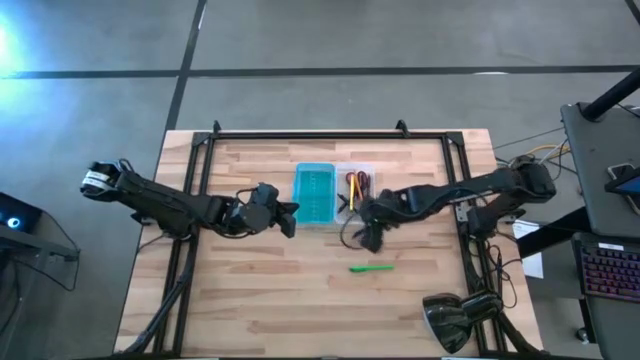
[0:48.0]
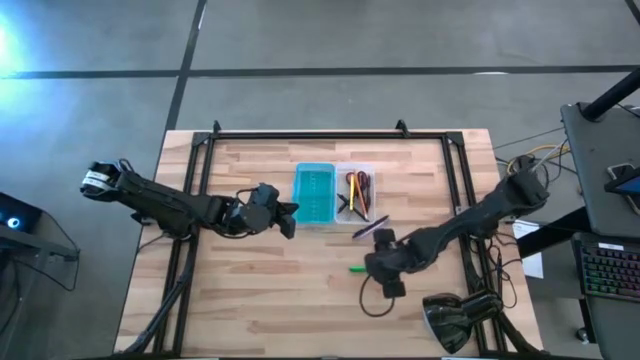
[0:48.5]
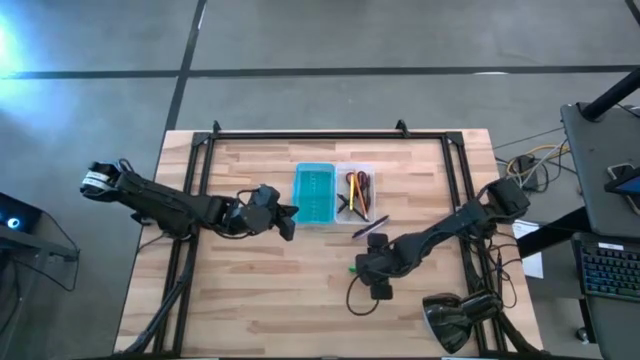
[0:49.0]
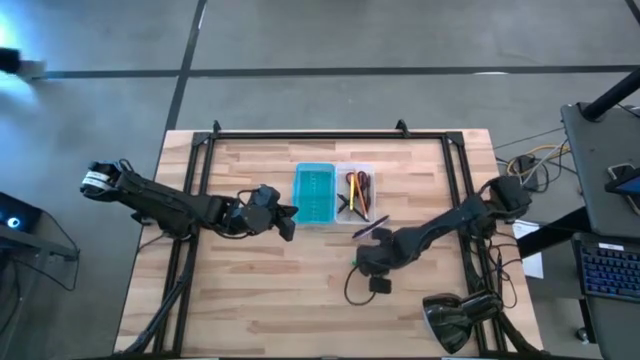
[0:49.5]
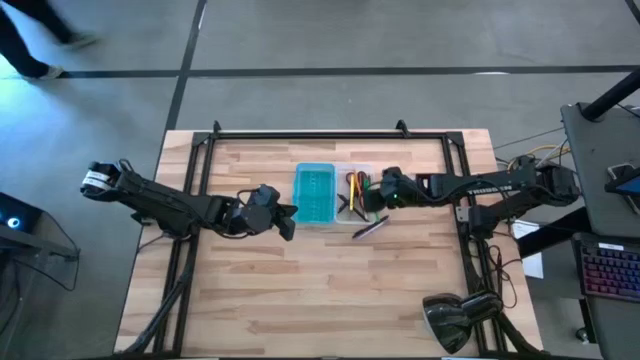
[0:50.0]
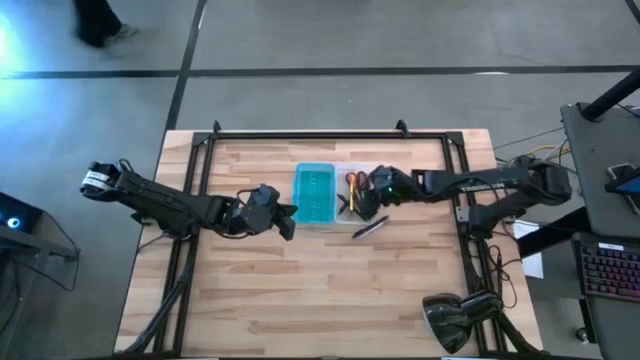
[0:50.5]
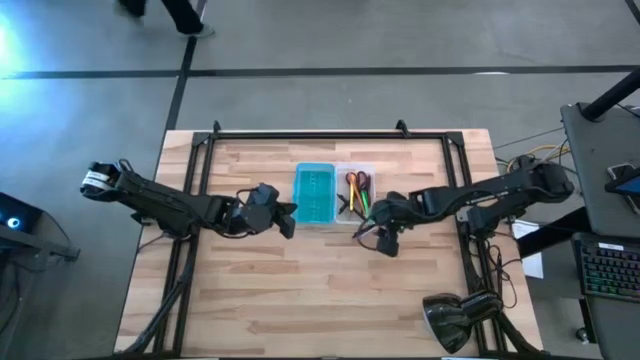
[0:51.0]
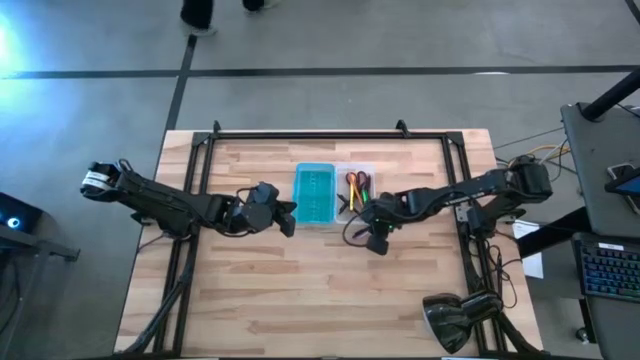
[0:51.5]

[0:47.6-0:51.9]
Task: Pick & place school supplies into a supply box
Put the green pen into the supply box

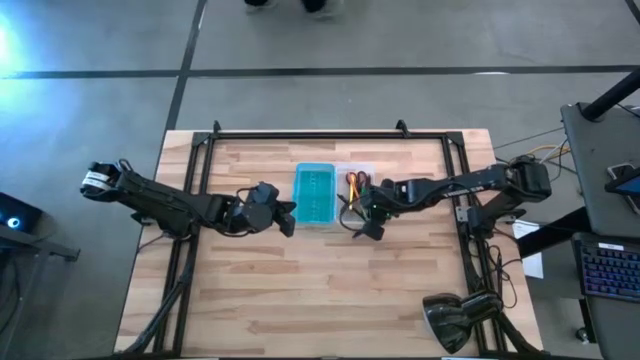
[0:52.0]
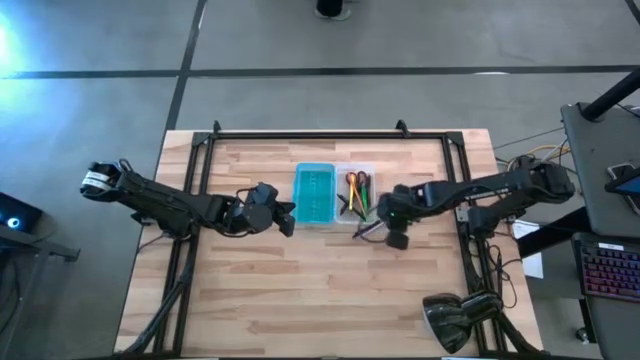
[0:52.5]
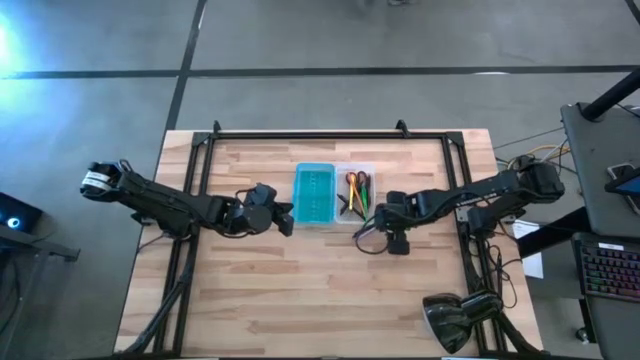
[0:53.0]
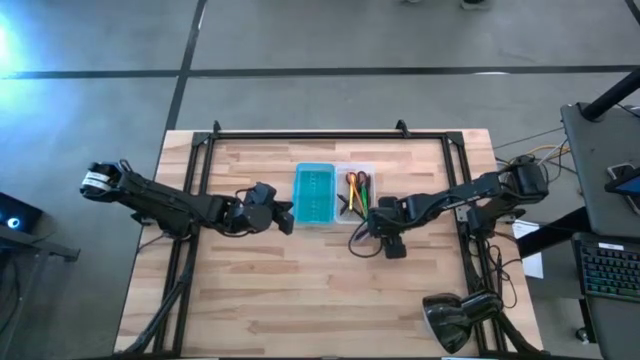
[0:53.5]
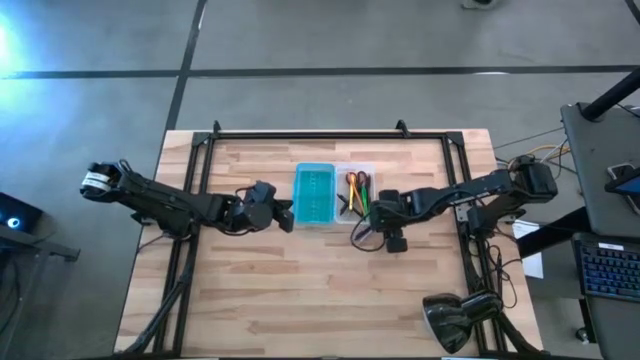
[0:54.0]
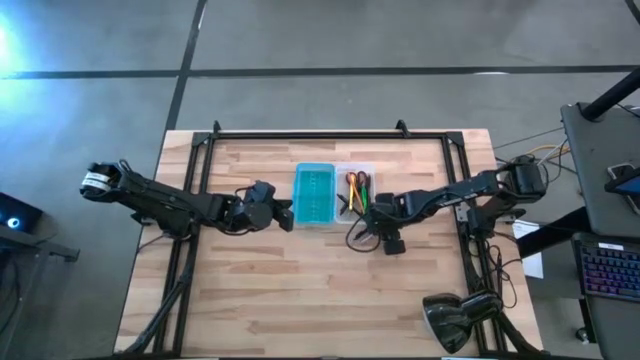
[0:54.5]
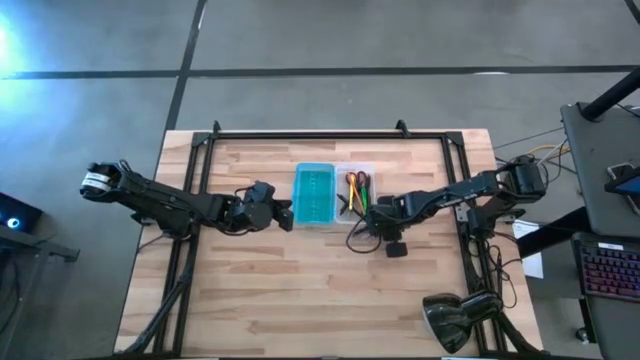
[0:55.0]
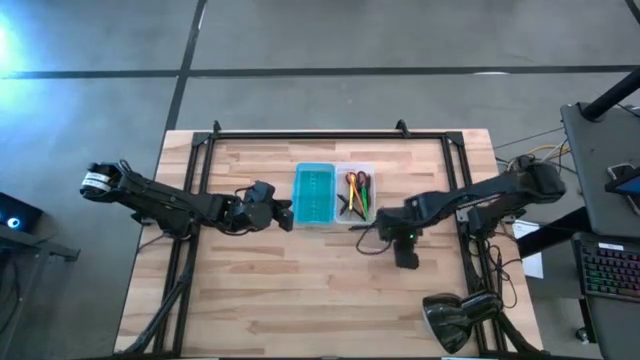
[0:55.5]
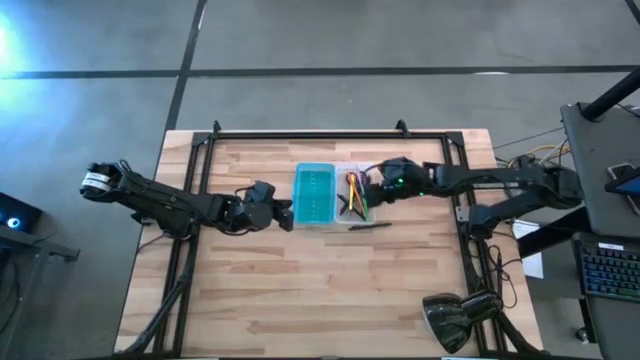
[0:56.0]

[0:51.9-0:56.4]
Put the violet pen into the supply box

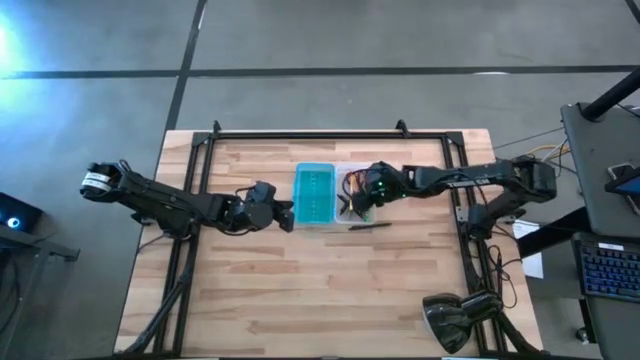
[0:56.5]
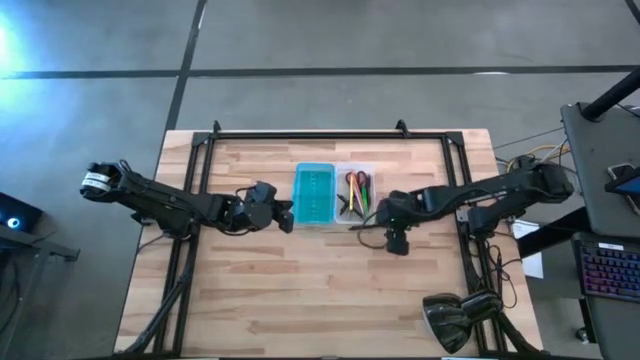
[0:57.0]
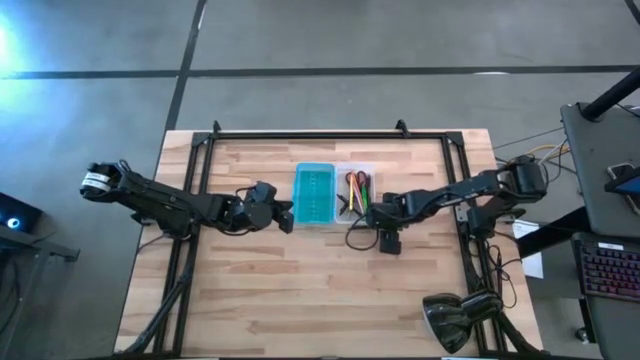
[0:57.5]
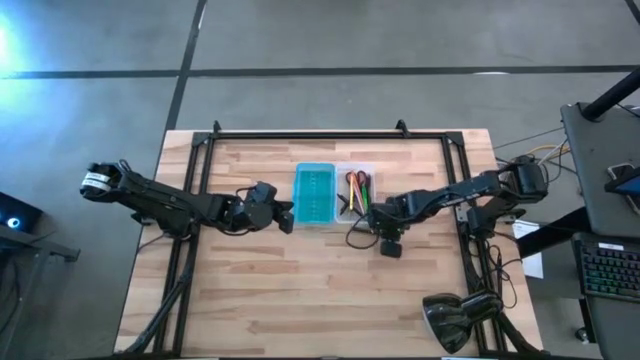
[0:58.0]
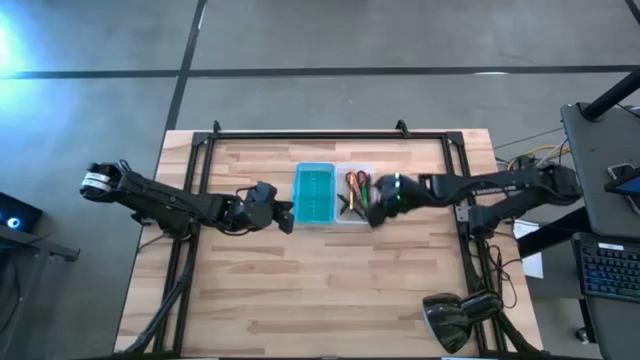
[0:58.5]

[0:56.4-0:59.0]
Put the black pen into the supply box

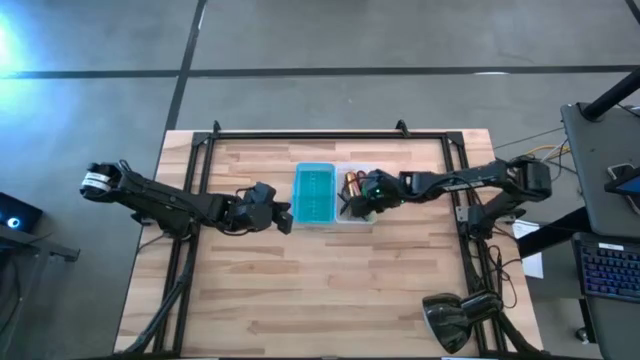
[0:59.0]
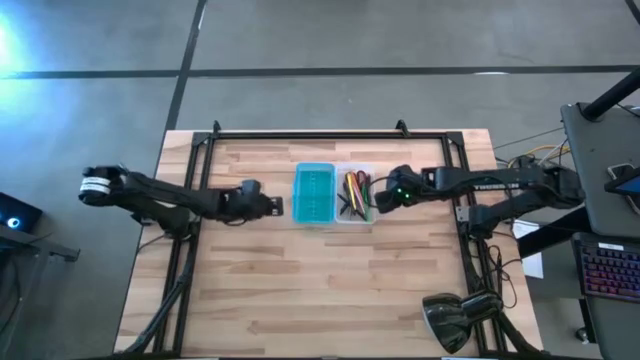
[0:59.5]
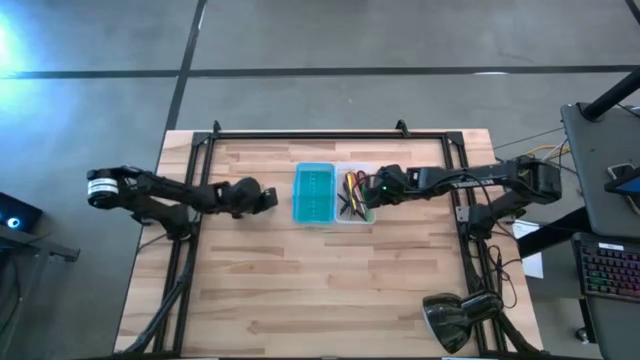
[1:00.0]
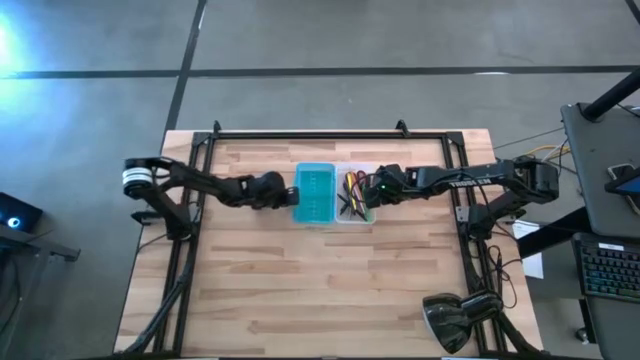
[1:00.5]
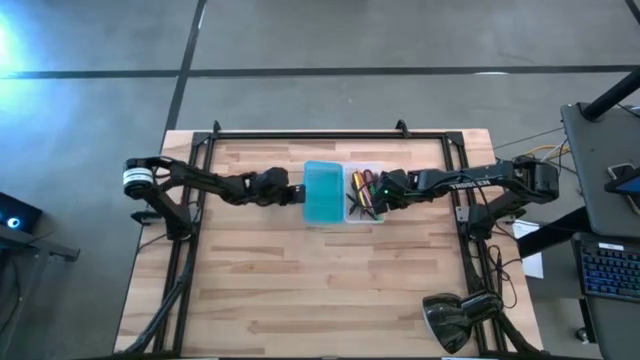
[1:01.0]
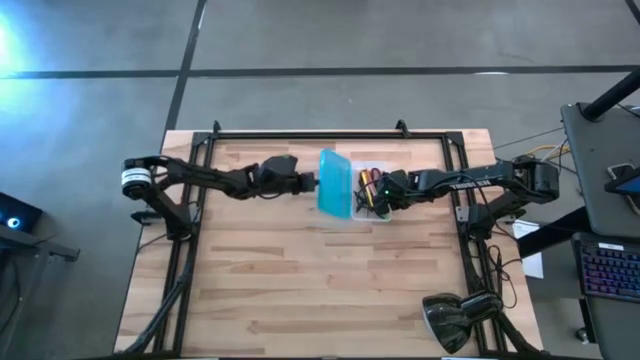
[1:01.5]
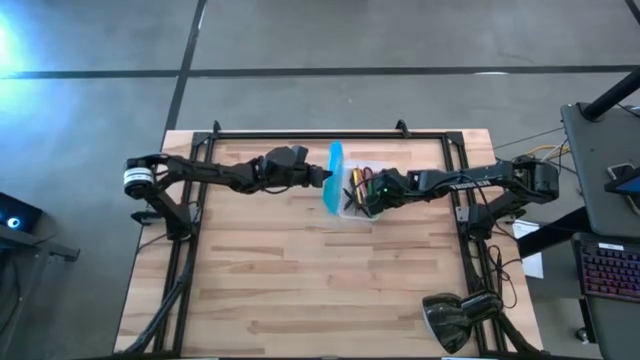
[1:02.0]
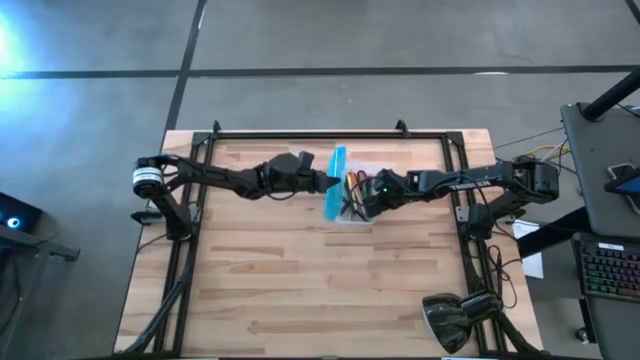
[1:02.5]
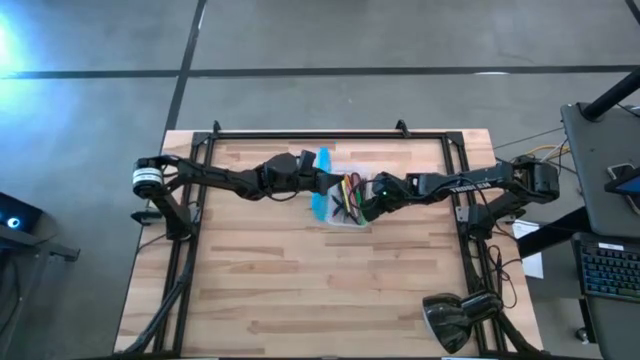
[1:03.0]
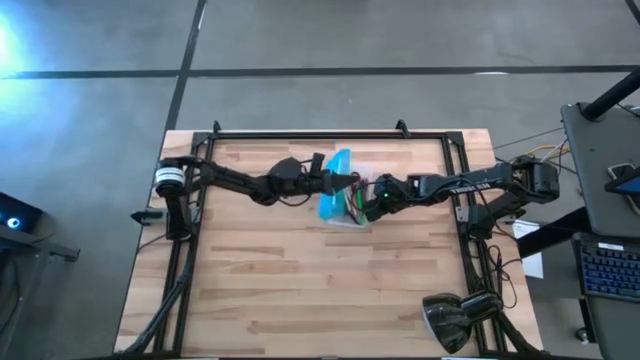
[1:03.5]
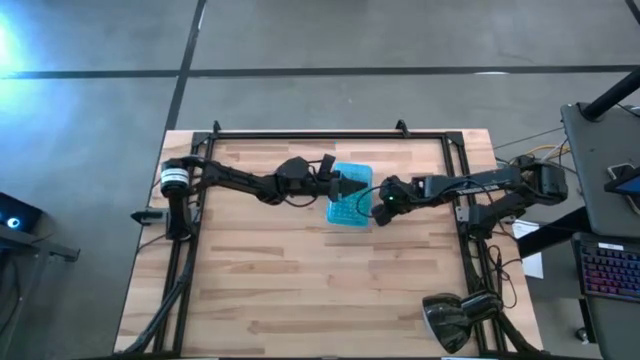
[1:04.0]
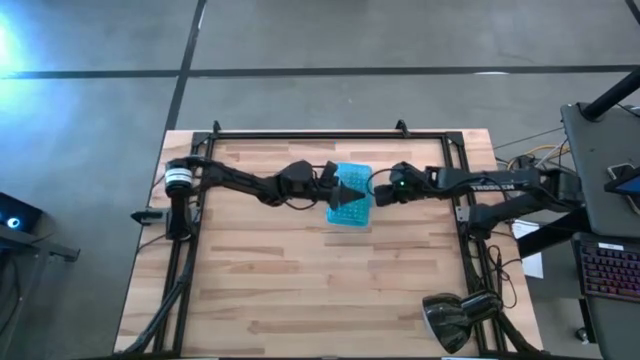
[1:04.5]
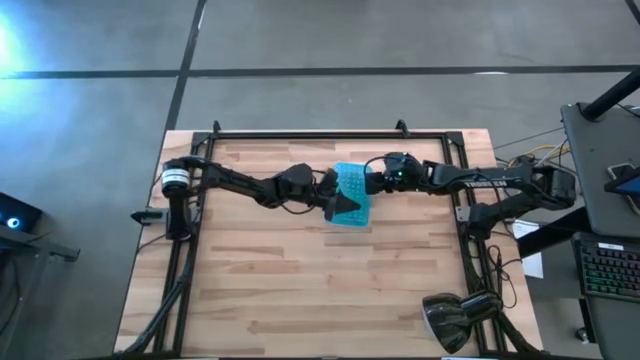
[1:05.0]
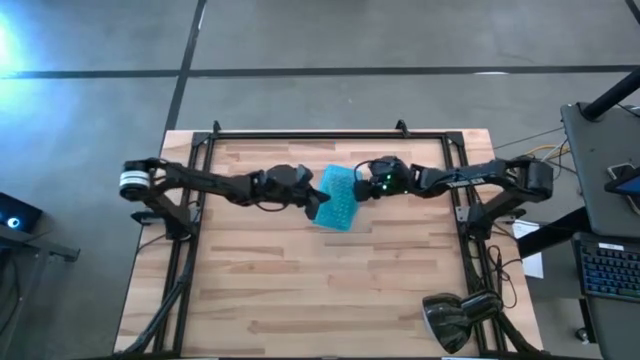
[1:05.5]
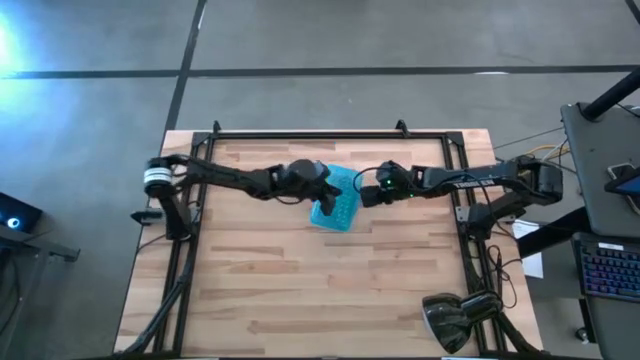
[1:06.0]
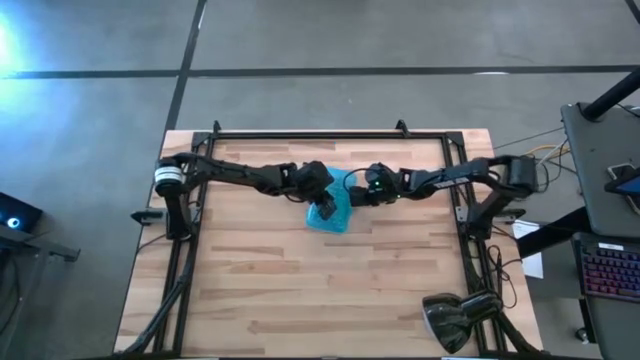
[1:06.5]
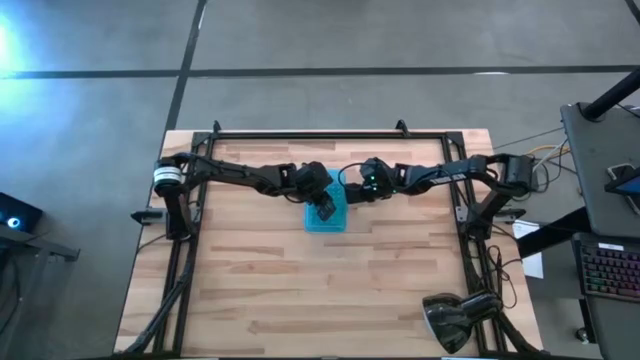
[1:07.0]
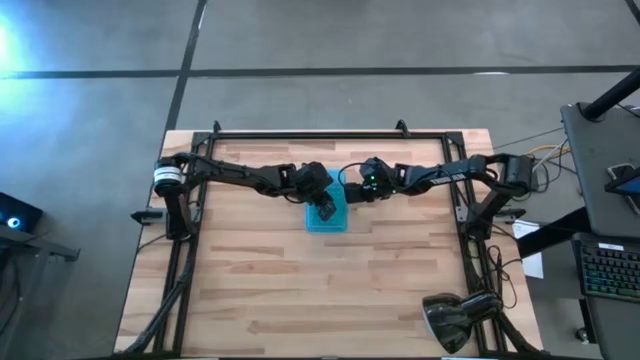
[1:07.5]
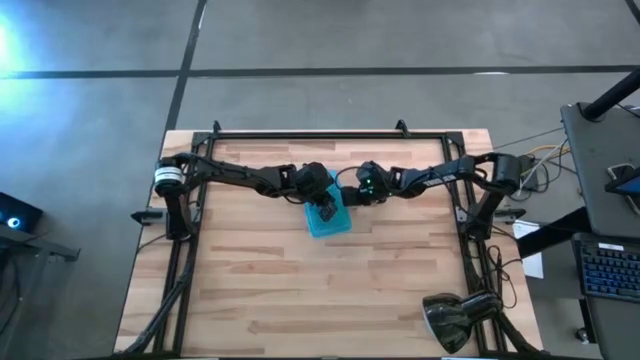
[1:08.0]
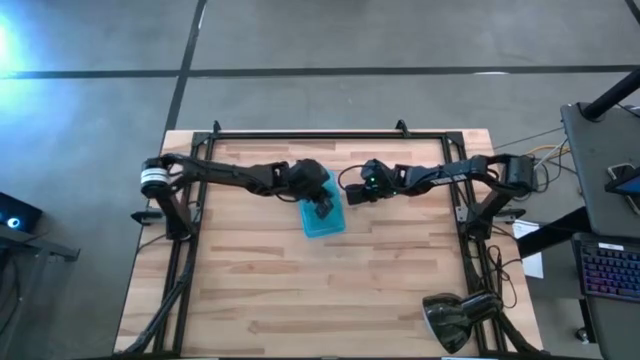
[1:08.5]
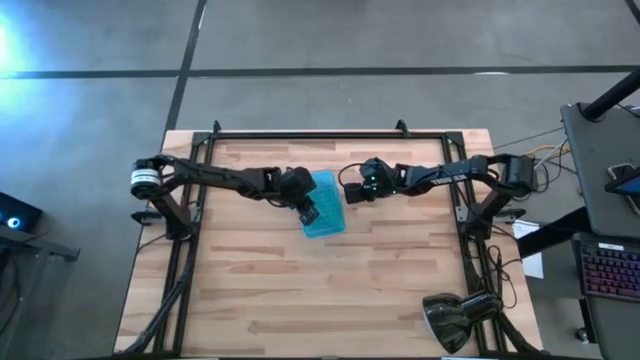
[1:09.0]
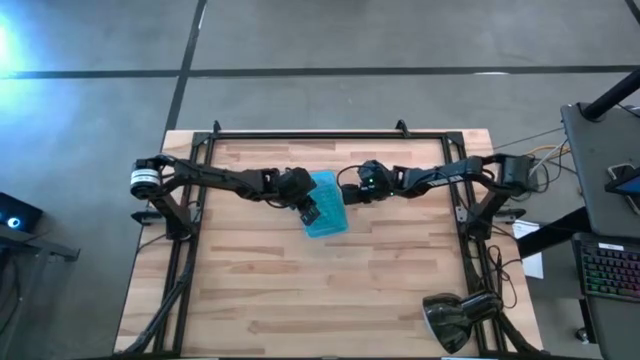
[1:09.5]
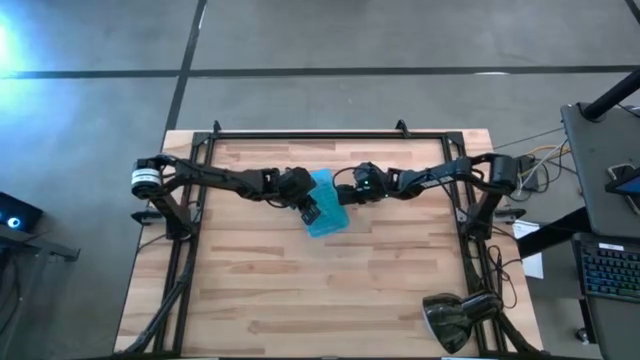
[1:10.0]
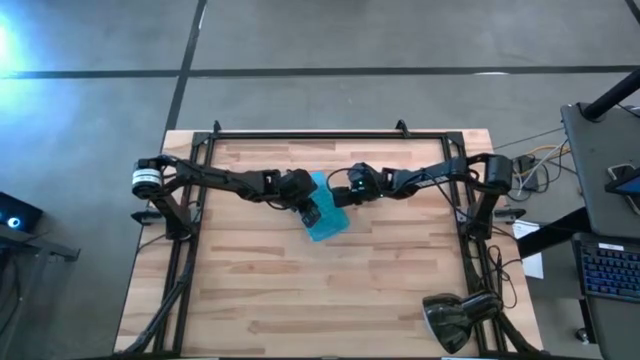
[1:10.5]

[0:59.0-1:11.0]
Close the supply box
